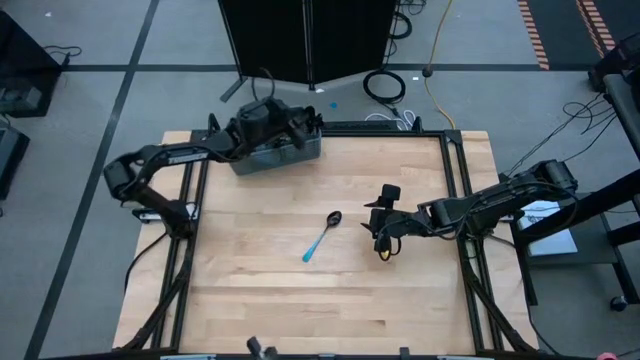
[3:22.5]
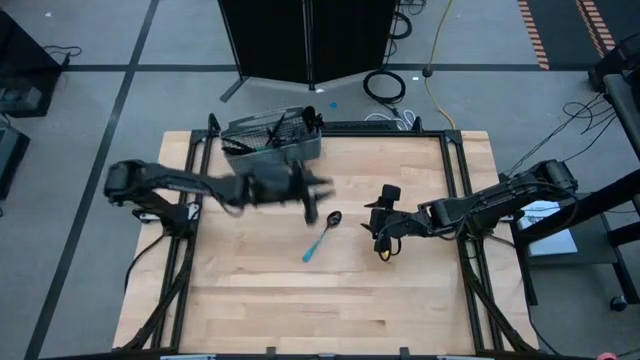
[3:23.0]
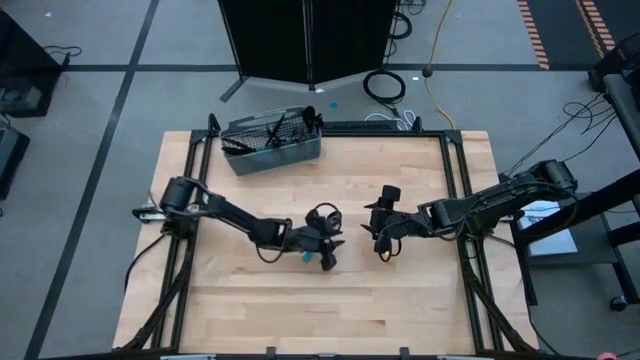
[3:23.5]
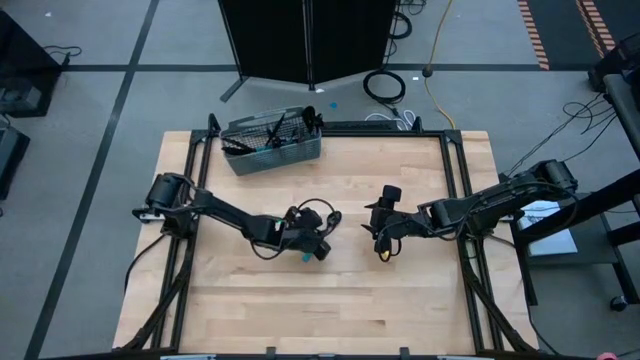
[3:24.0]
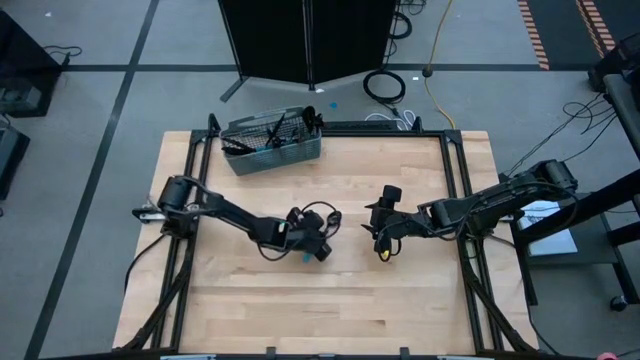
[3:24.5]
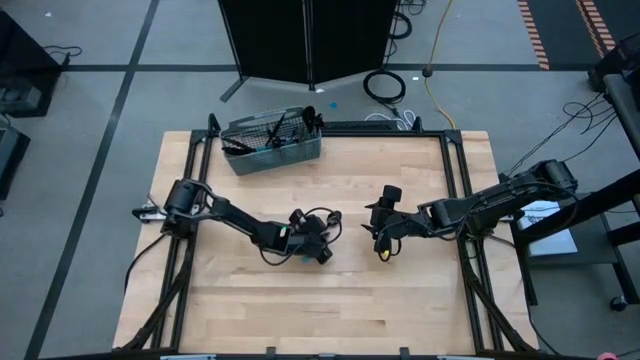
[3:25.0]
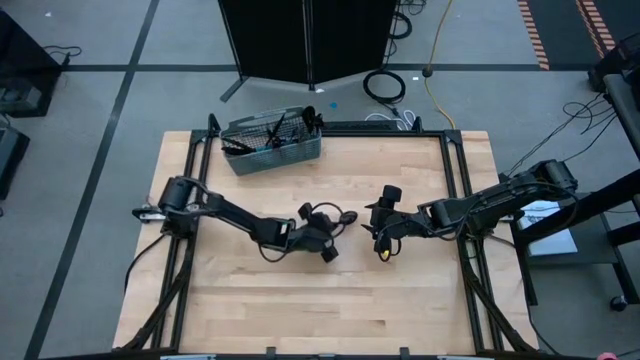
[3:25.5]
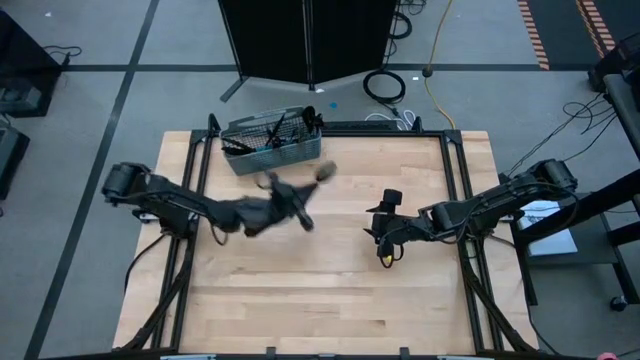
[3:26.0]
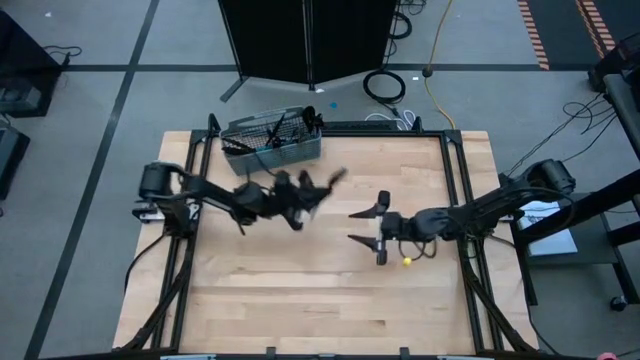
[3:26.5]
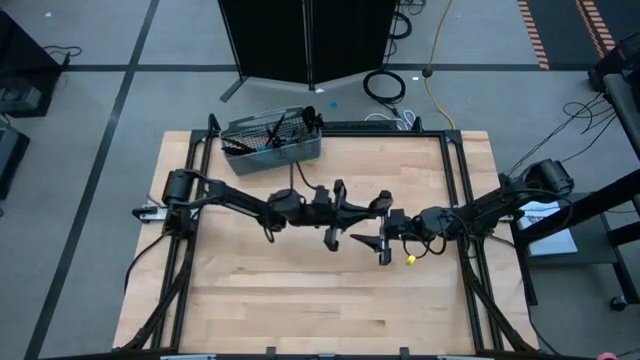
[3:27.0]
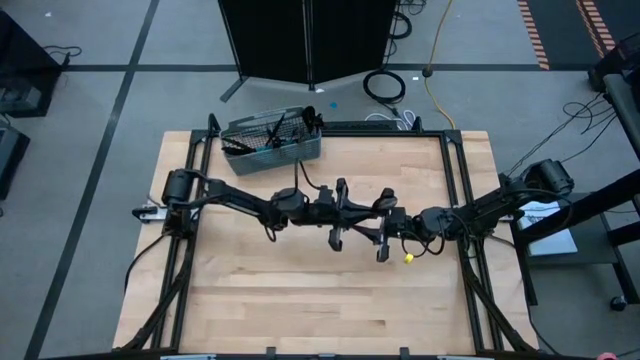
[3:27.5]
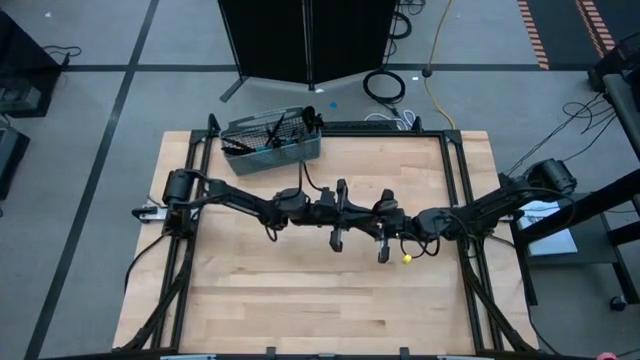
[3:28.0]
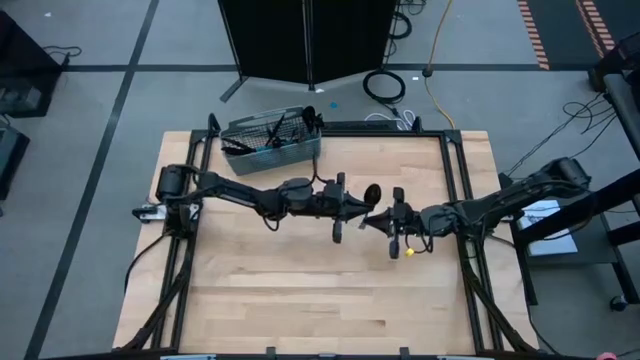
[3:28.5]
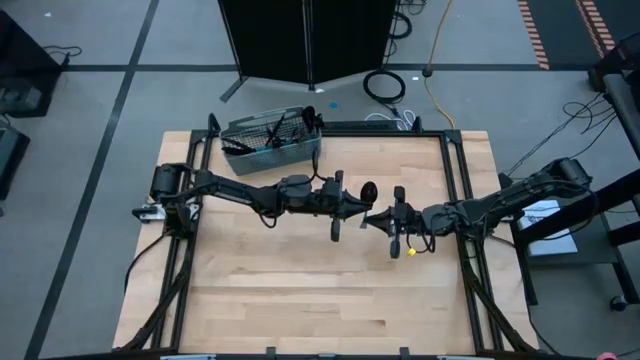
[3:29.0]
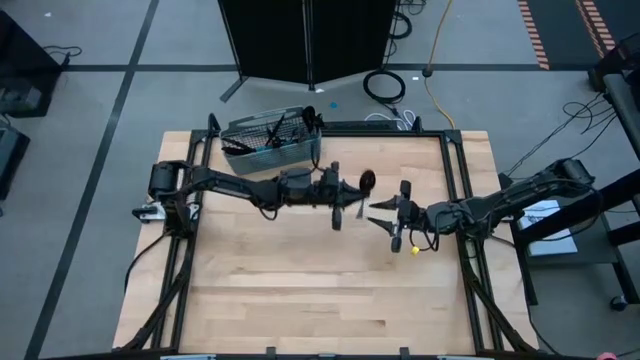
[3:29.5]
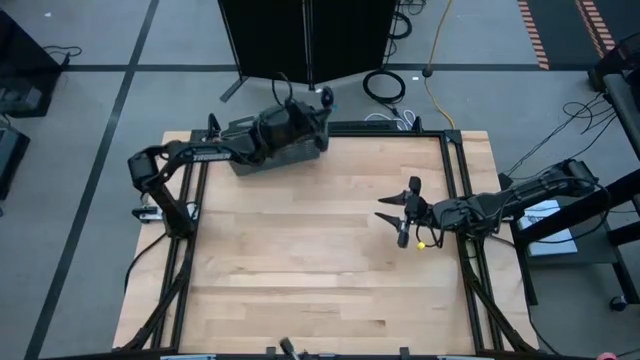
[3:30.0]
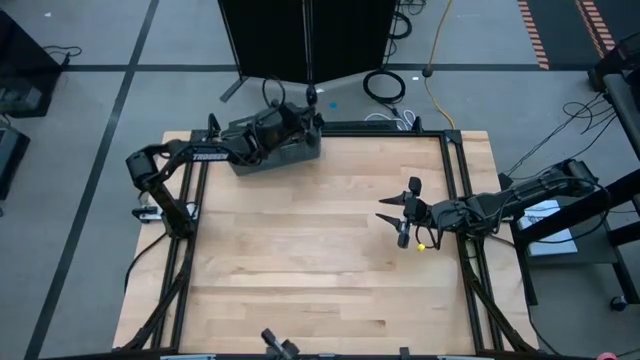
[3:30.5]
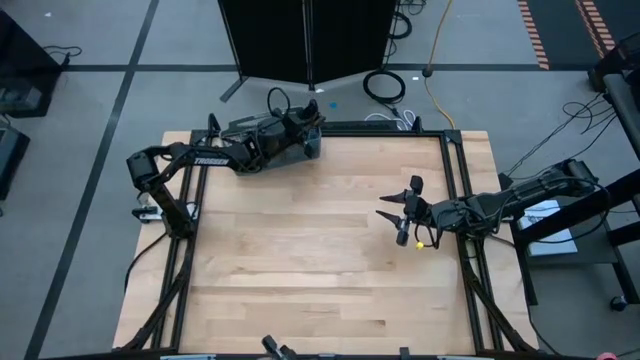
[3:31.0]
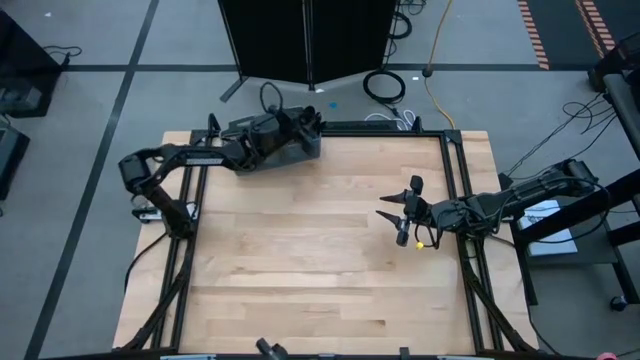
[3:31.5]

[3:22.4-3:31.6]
Task: Sort silverware
Put the blue spoon into the silverware basket

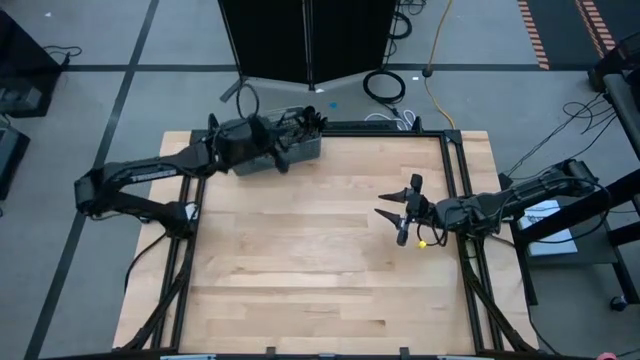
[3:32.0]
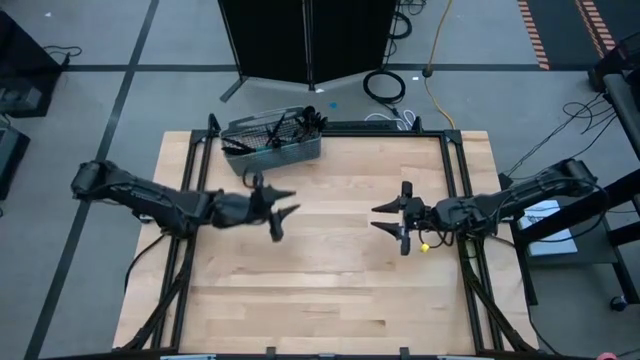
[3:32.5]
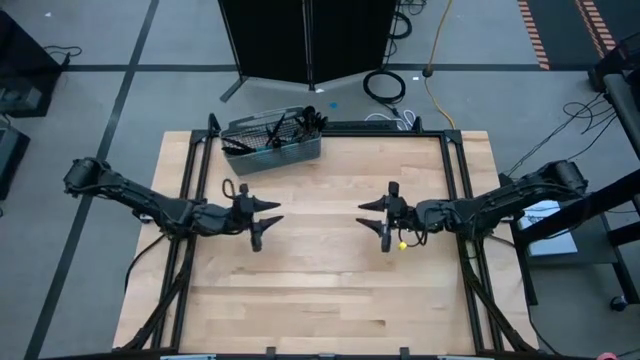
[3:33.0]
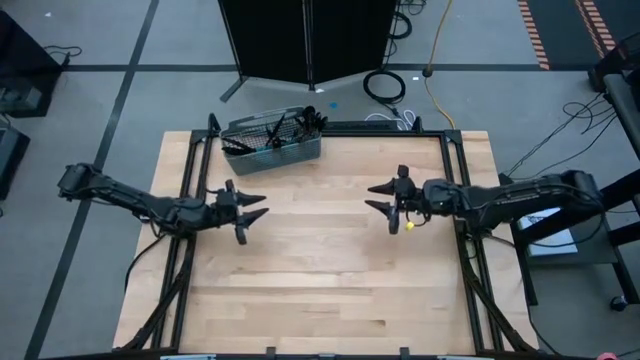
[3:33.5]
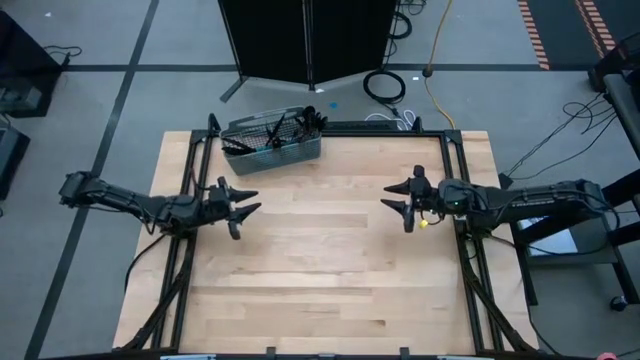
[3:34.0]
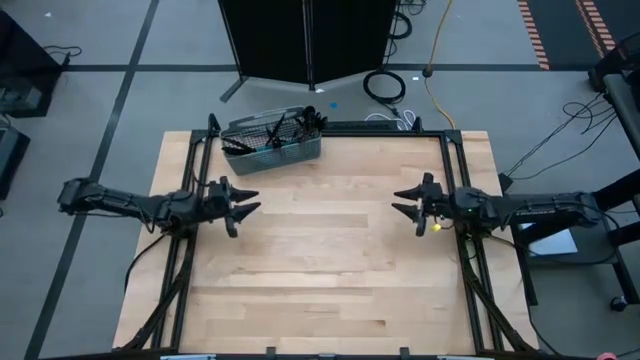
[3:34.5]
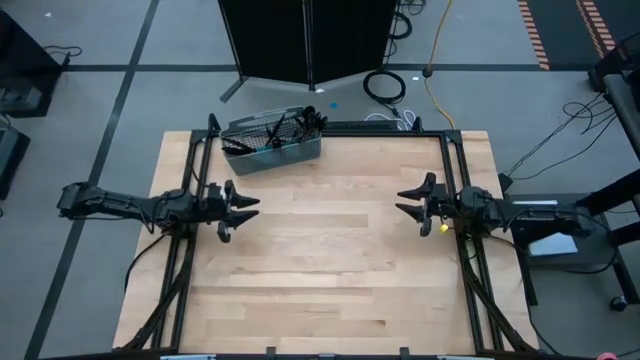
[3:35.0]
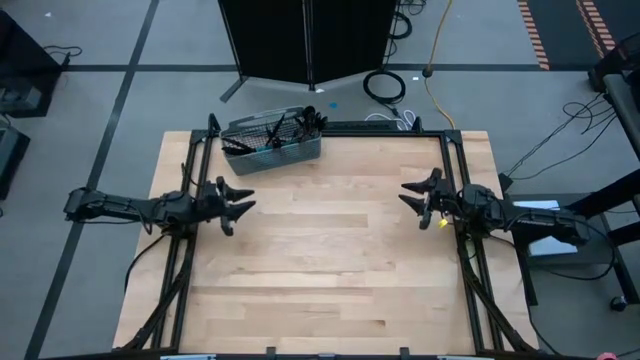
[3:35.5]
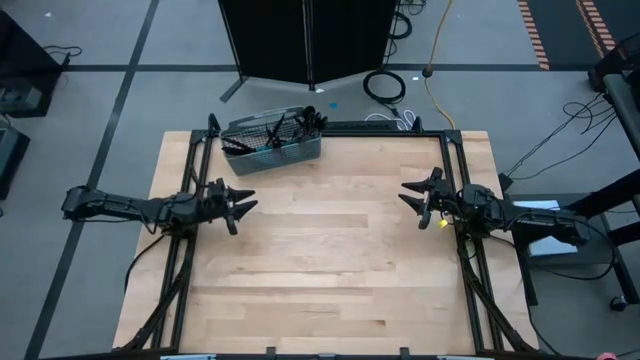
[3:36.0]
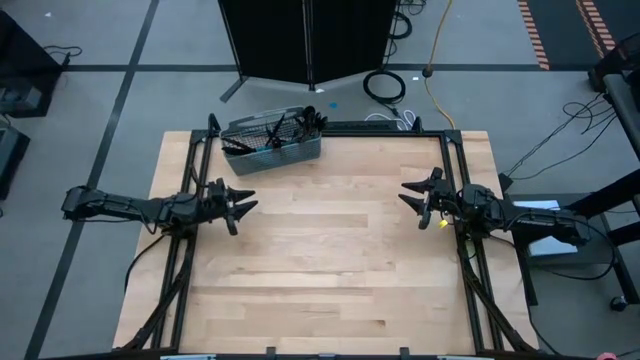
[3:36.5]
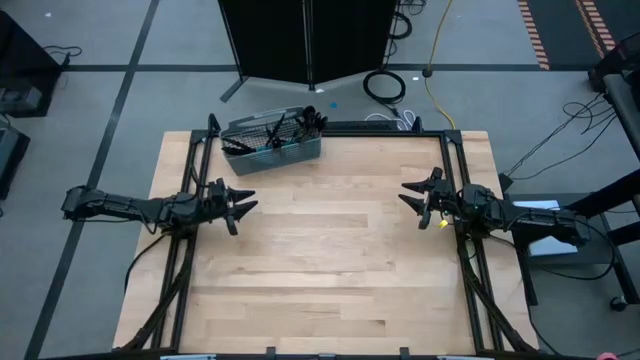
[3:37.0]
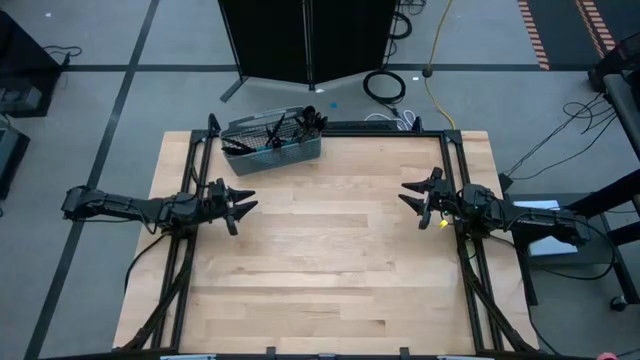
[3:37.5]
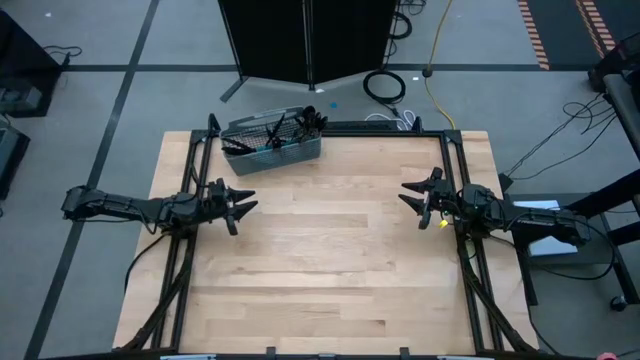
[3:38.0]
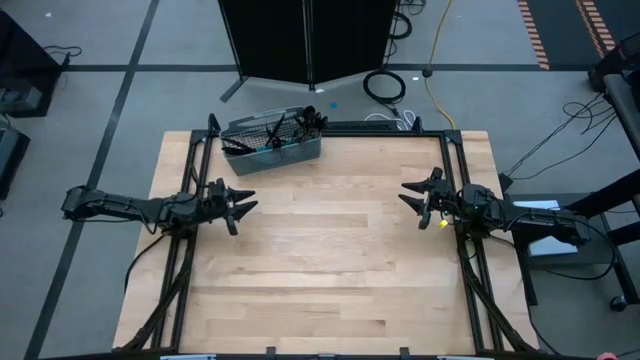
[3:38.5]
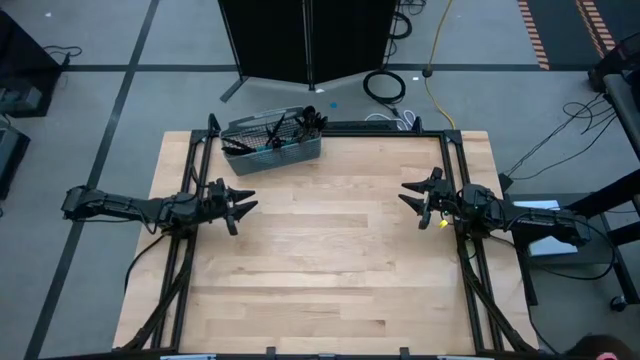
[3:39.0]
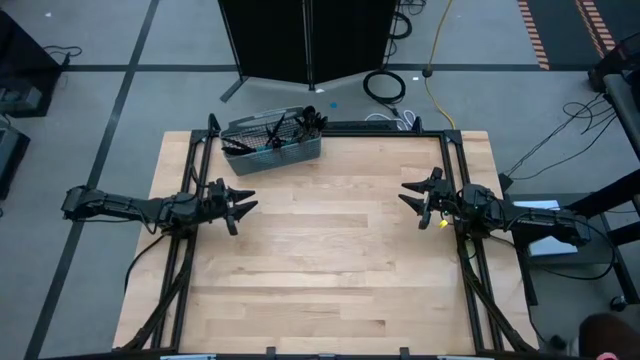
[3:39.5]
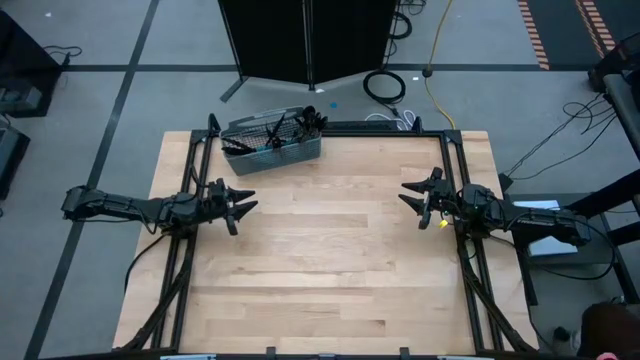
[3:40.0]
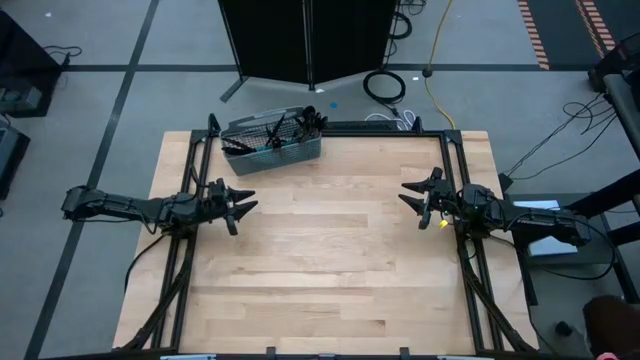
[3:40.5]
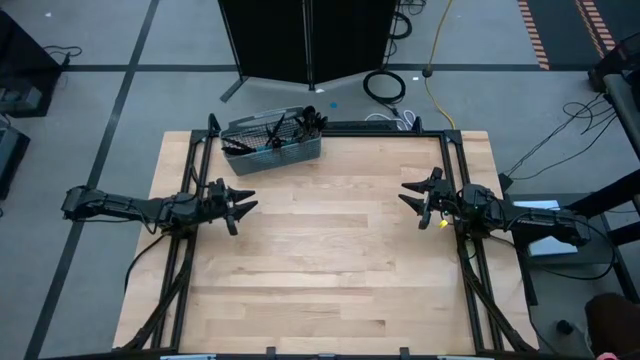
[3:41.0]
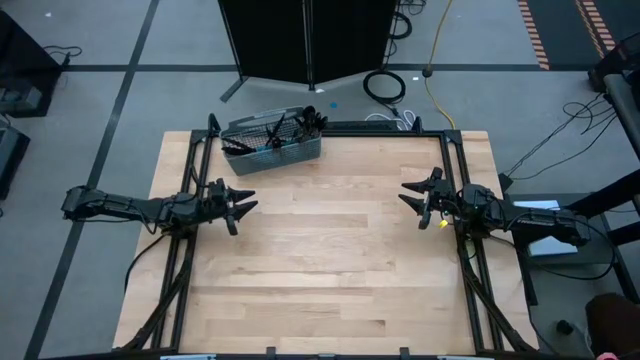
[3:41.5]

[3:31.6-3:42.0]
Return to Home Position

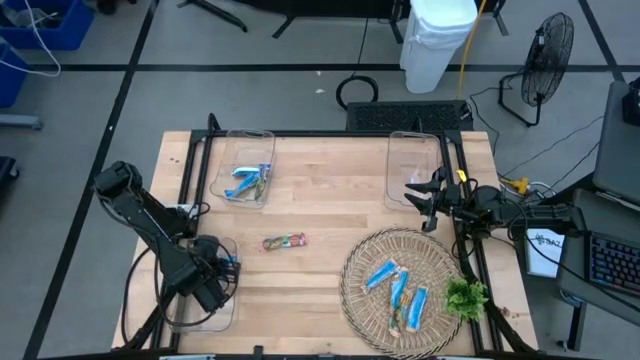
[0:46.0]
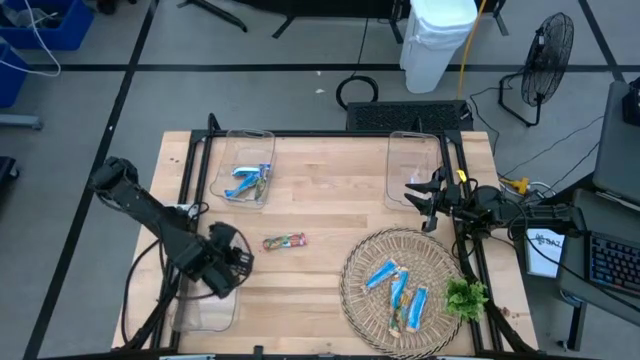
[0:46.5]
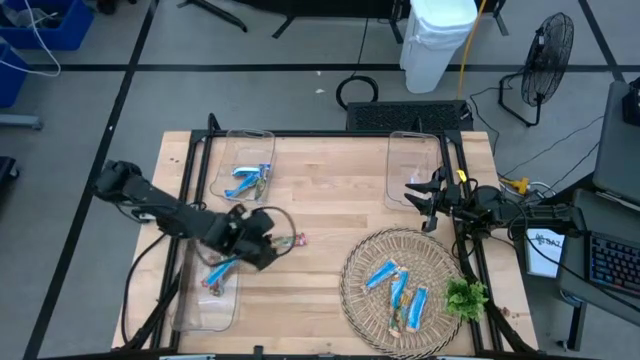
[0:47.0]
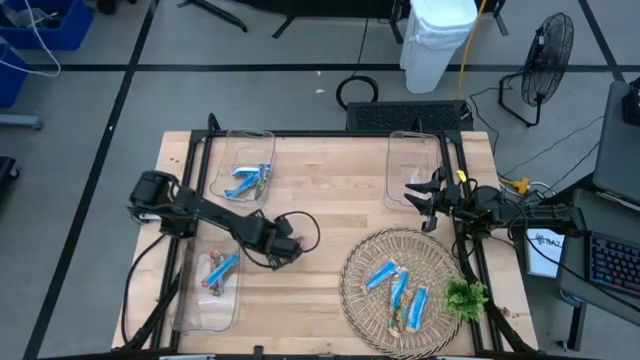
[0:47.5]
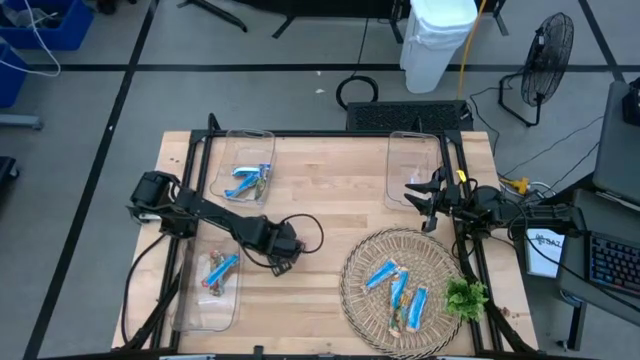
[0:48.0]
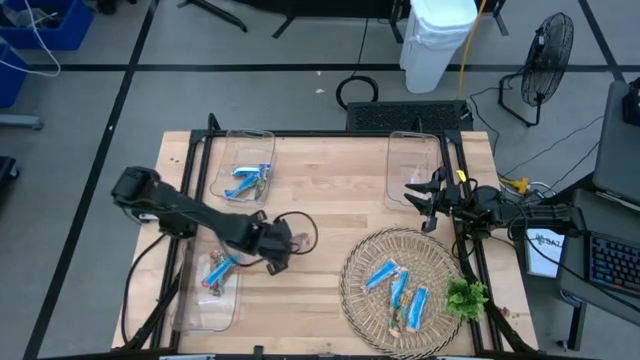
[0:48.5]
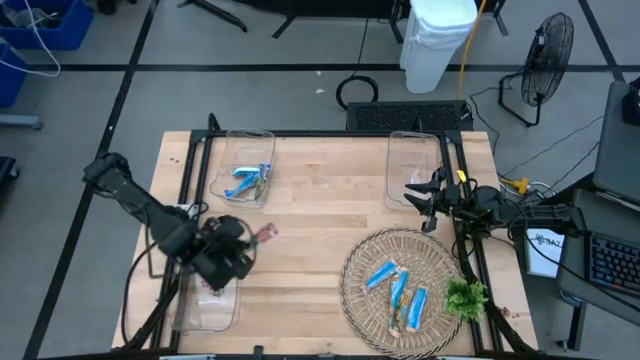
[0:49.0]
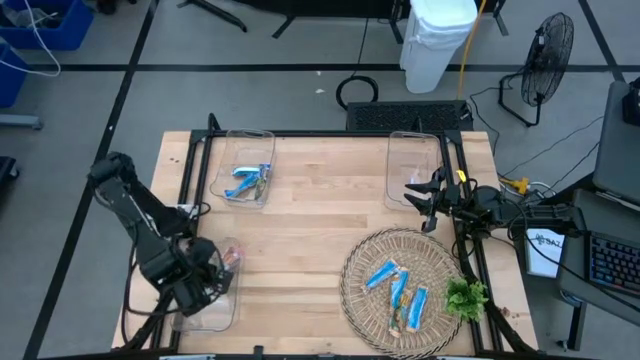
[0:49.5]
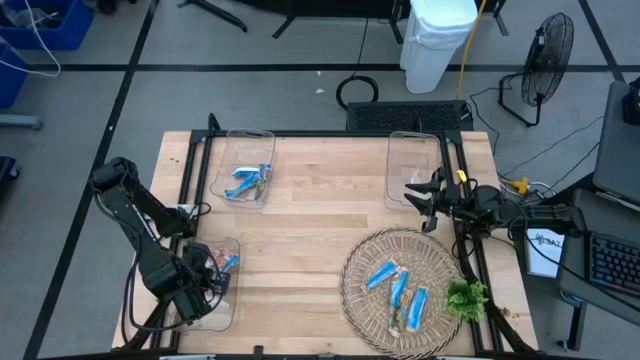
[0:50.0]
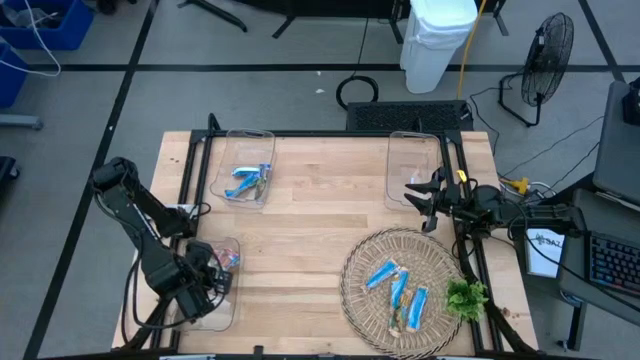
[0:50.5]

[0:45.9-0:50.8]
Task: Pick and place Granola Bars by type
Put the orange granola bar into the bottom transparent bin
